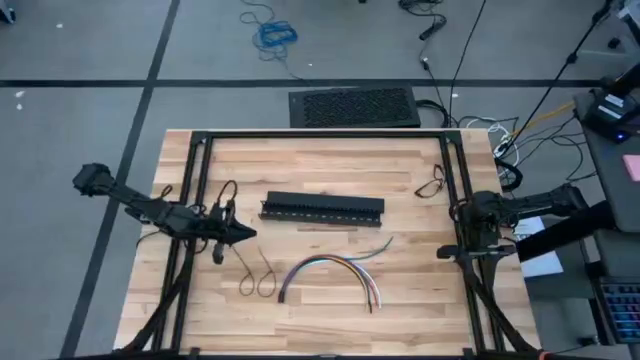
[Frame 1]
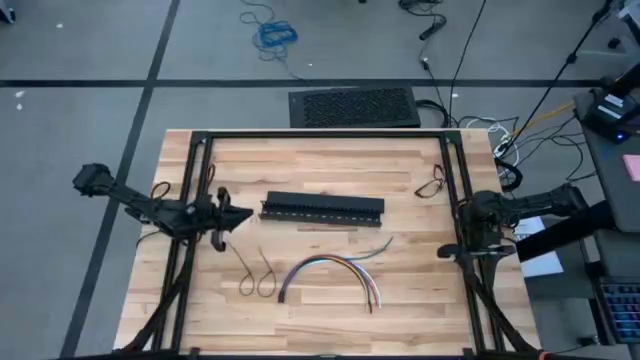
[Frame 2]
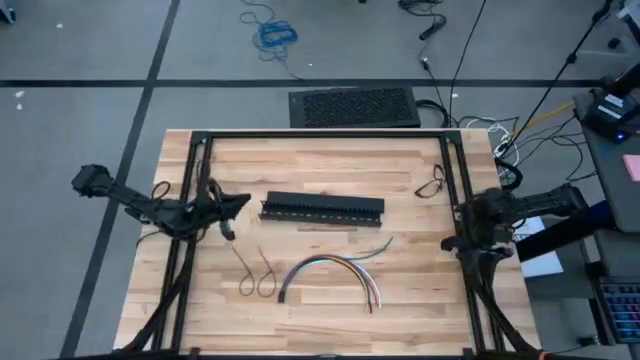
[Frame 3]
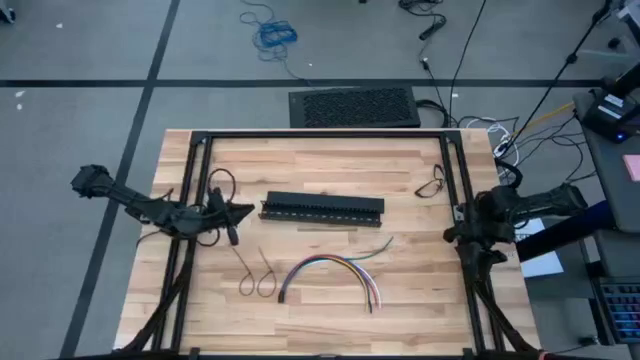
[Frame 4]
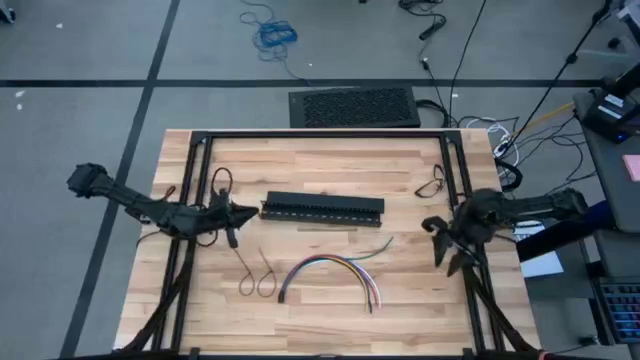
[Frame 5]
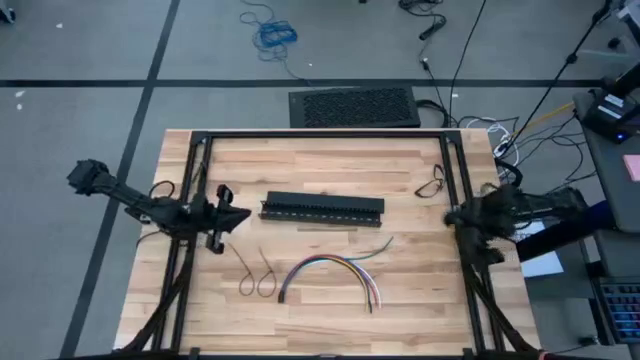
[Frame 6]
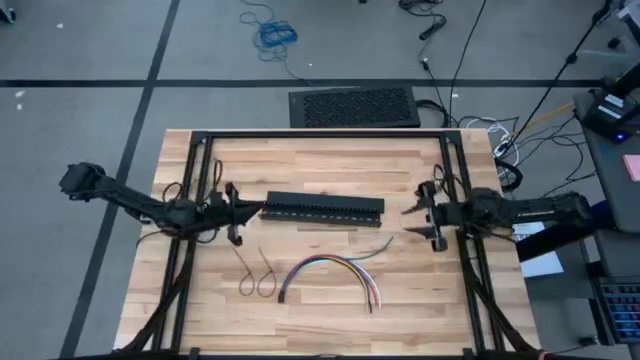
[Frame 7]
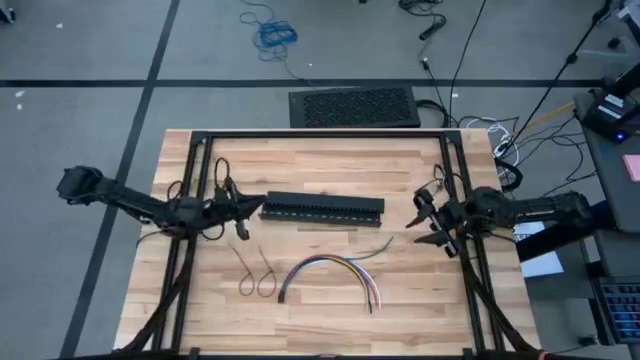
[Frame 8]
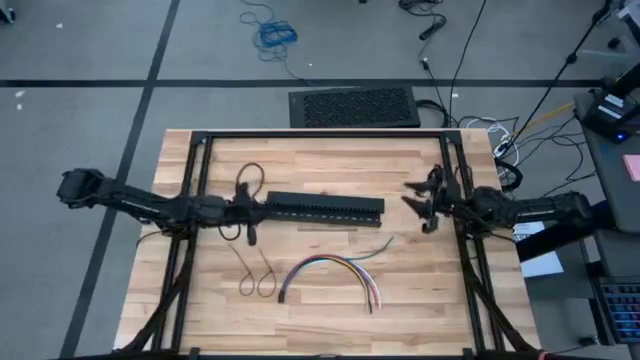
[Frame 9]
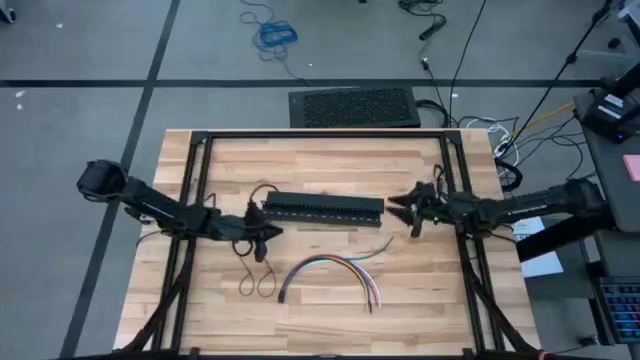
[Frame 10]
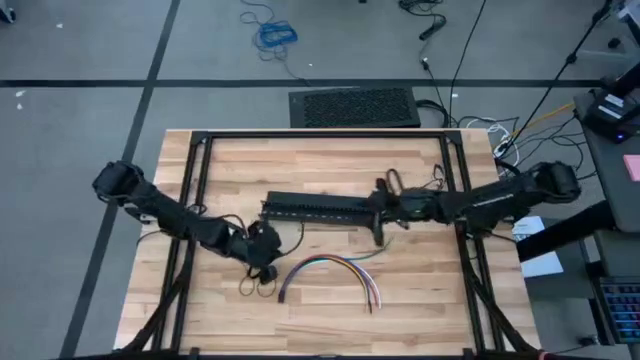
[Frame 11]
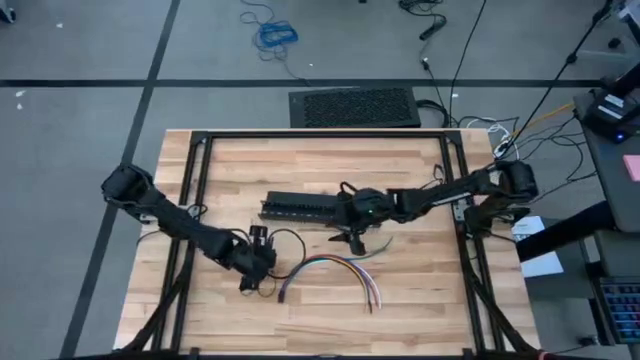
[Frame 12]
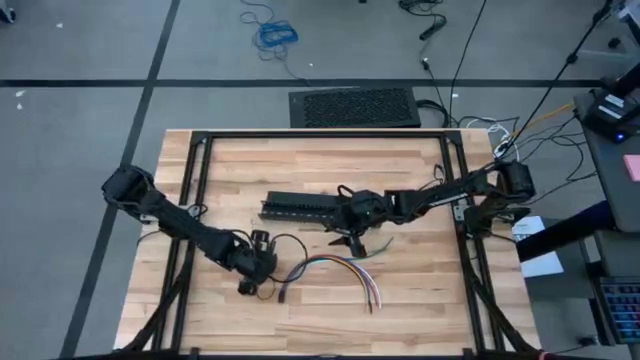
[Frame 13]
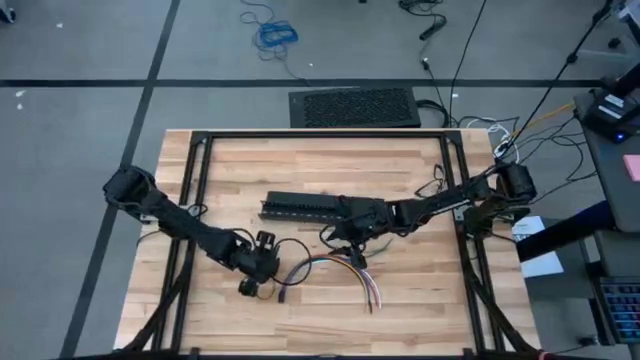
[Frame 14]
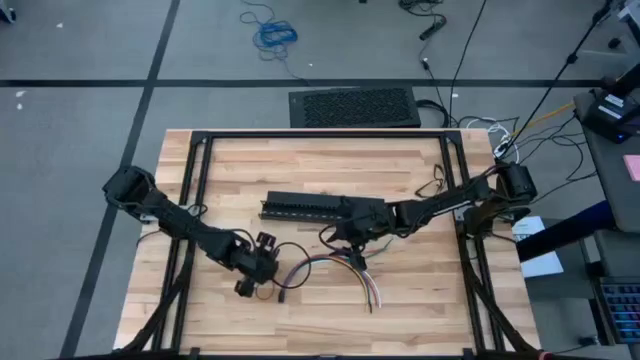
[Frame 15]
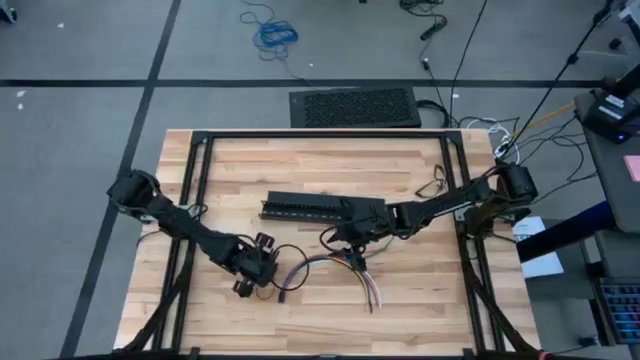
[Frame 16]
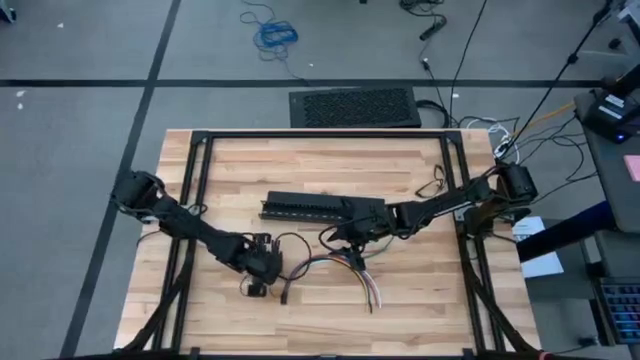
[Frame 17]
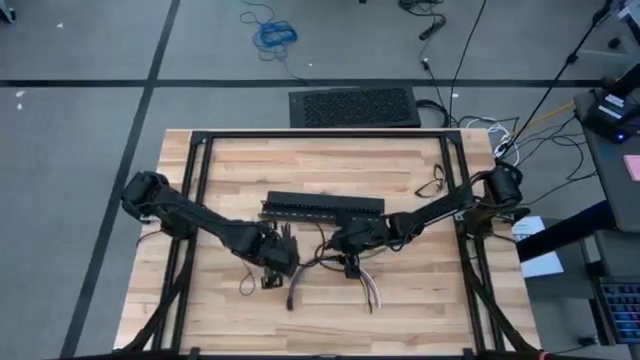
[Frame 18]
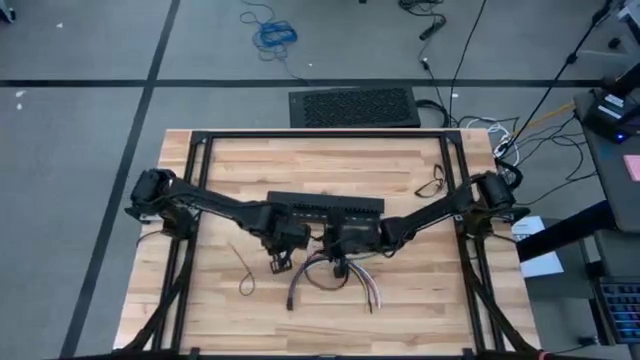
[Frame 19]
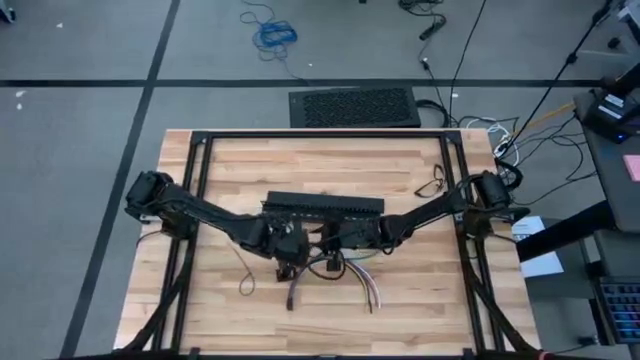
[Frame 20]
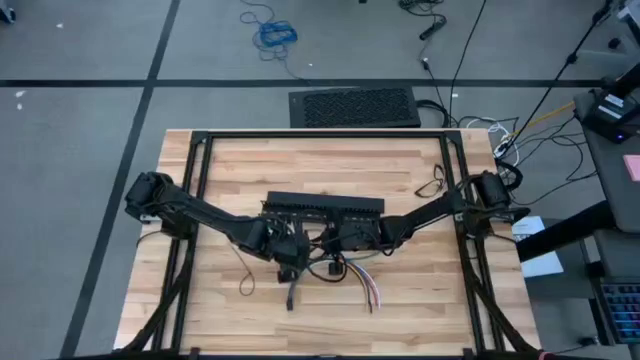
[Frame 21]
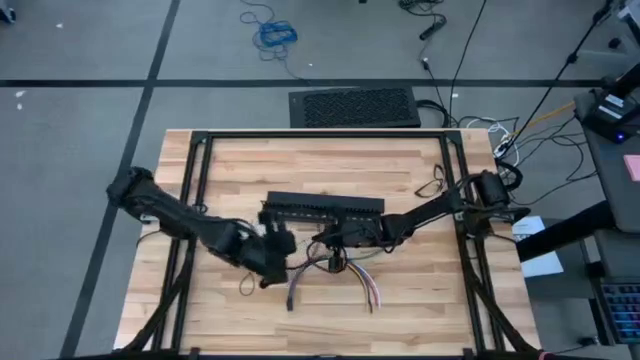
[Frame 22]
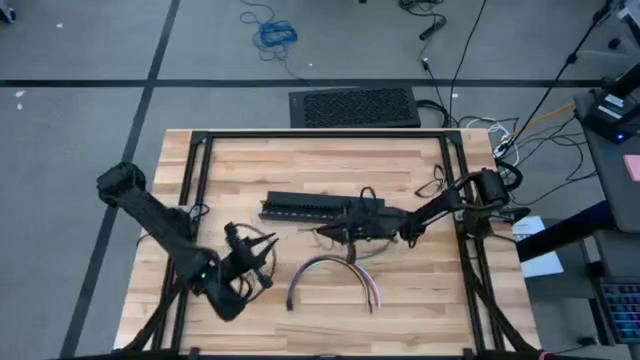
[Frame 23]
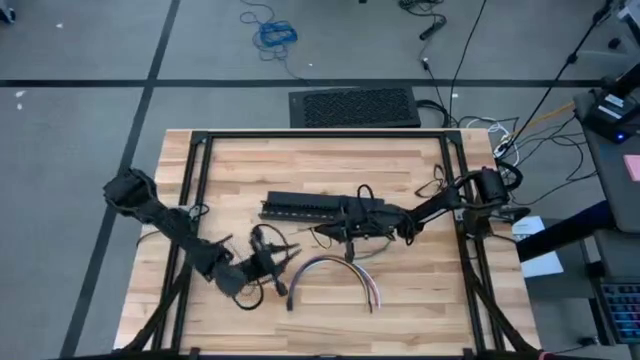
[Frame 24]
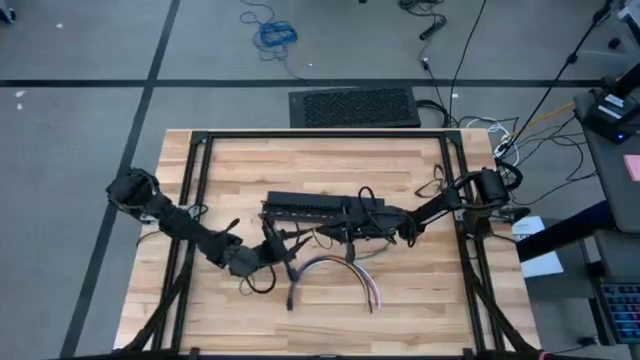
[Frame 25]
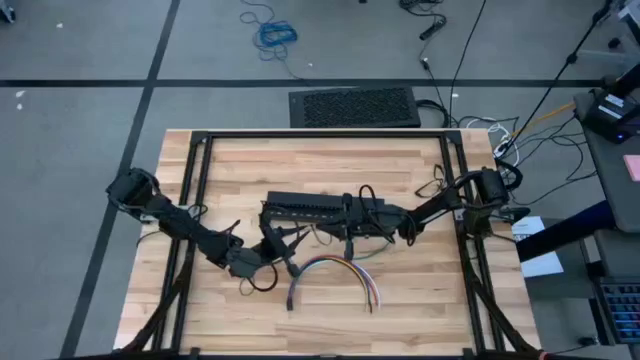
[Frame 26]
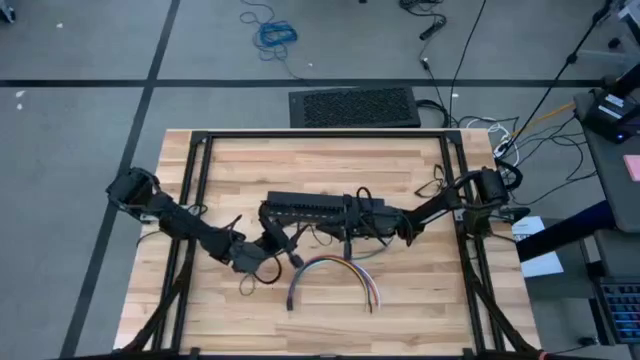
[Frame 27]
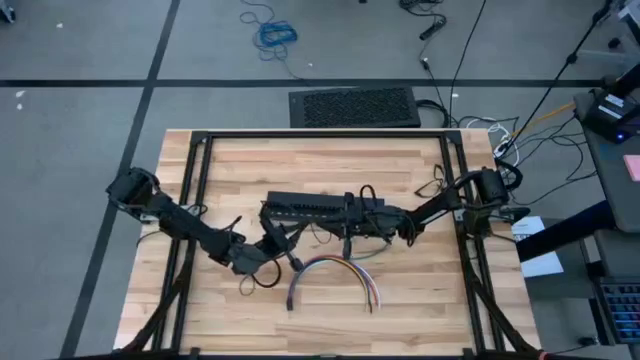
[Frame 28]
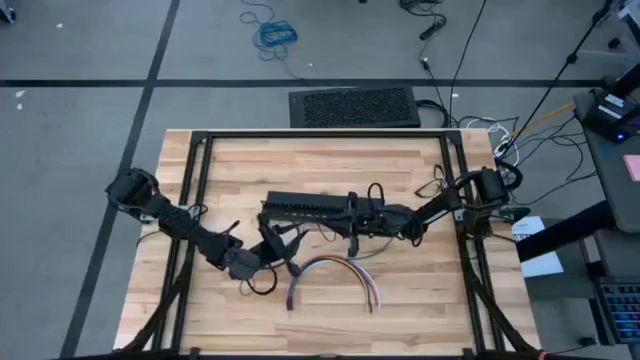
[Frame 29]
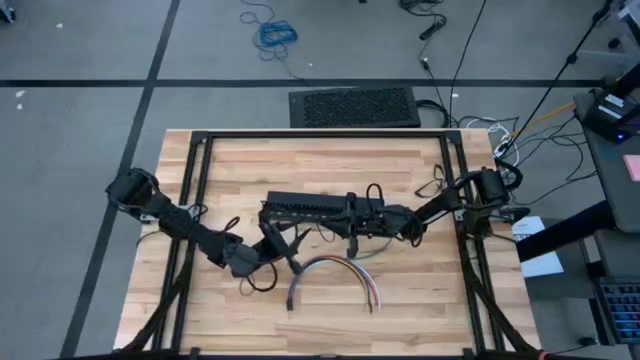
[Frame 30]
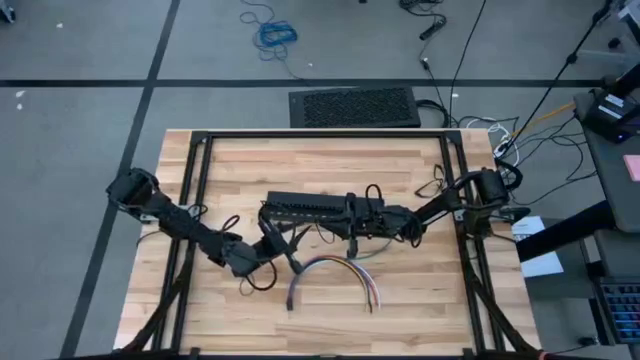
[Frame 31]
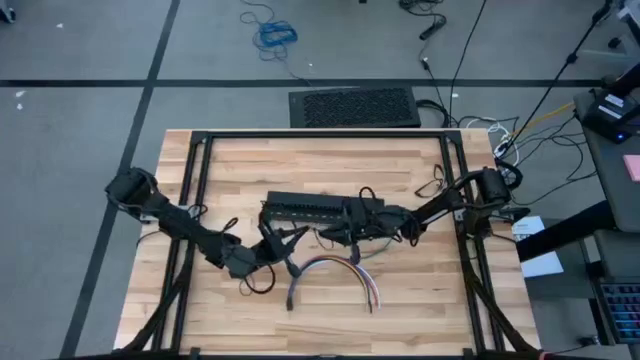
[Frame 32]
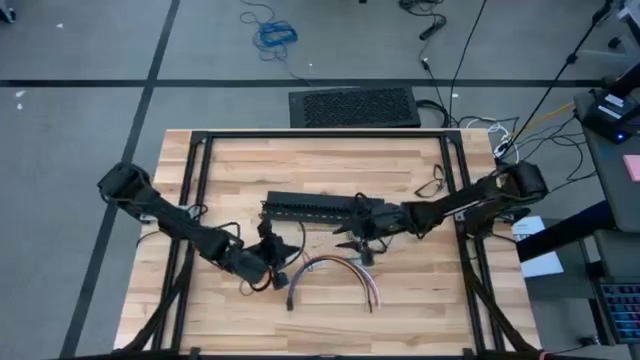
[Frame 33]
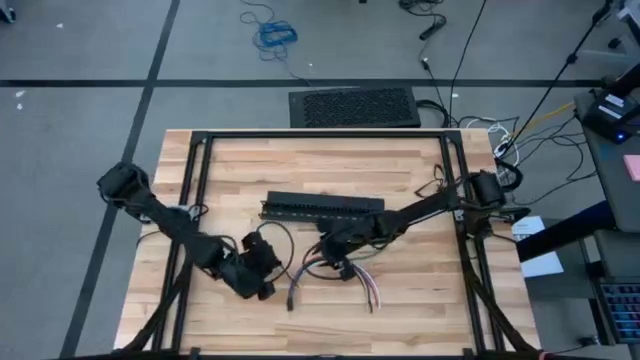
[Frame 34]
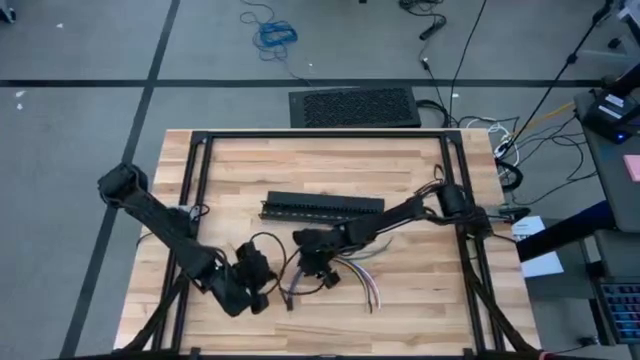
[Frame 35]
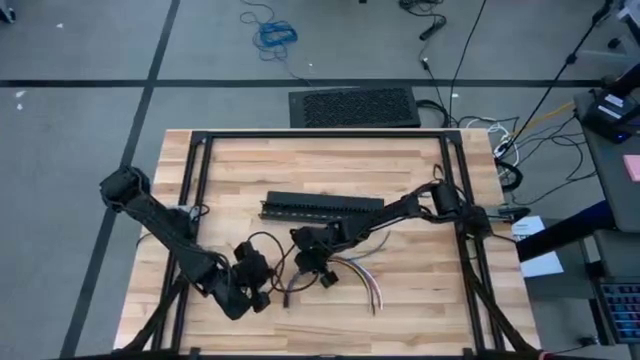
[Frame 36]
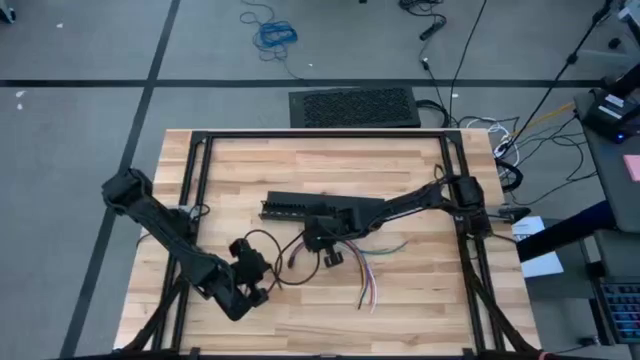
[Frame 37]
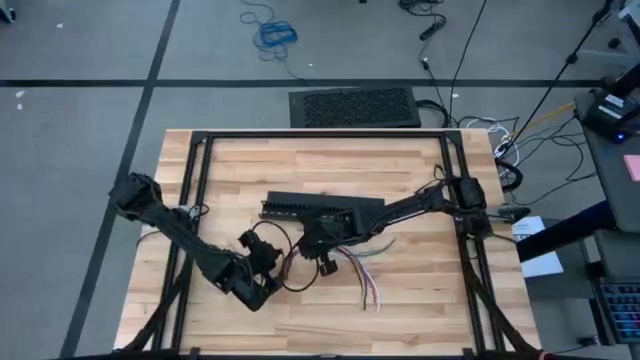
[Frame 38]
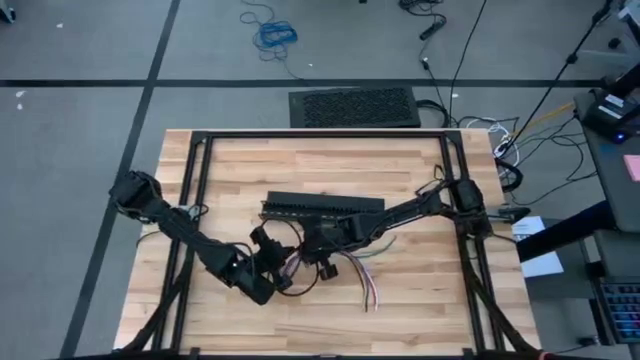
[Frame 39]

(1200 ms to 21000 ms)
Task: Ziptie cables
Wrap the black zip tie on the cables
